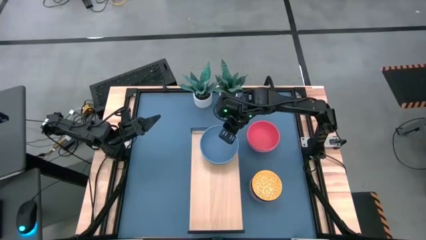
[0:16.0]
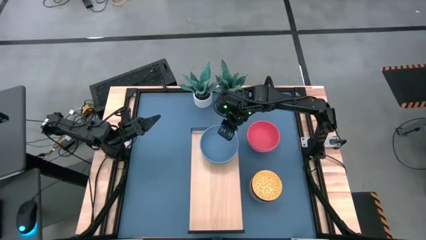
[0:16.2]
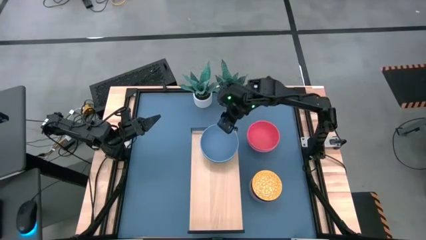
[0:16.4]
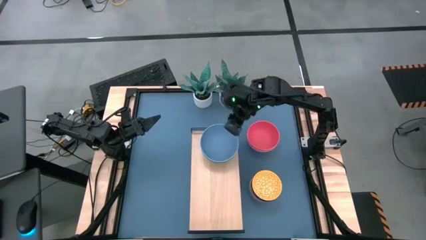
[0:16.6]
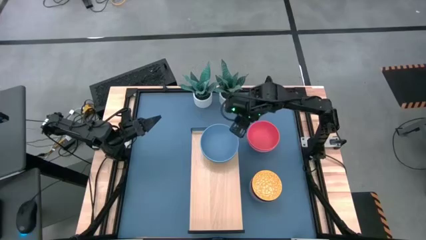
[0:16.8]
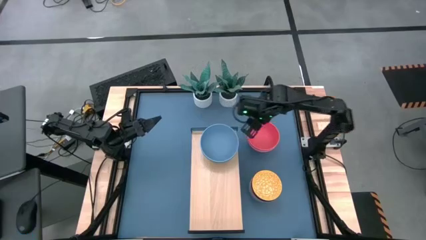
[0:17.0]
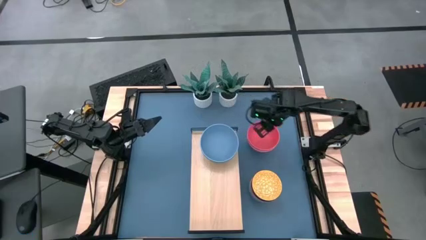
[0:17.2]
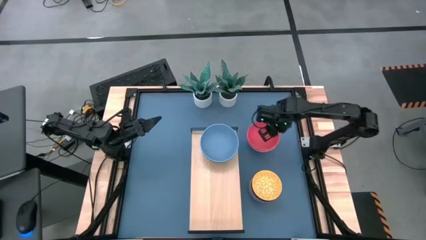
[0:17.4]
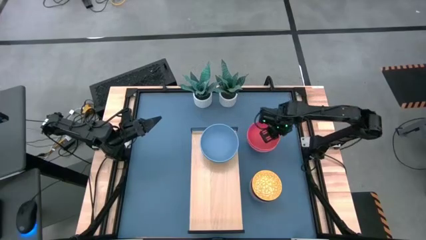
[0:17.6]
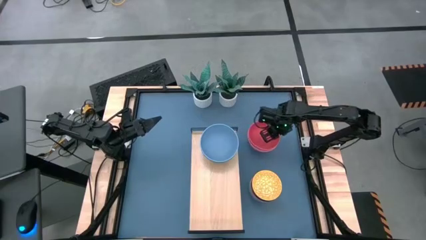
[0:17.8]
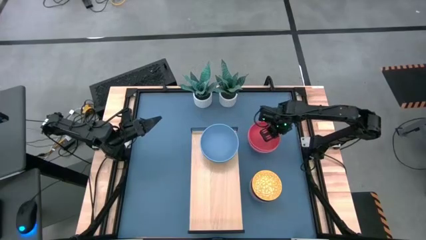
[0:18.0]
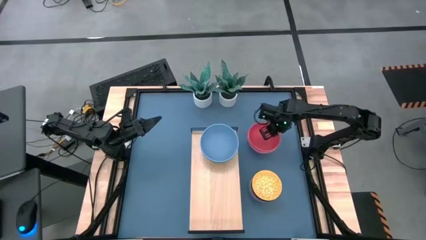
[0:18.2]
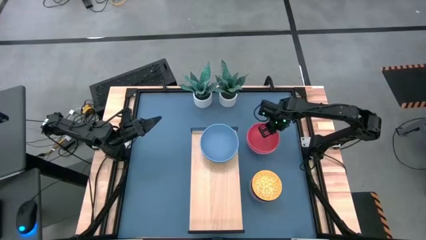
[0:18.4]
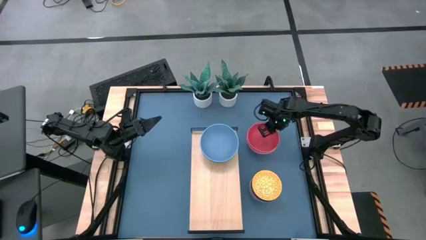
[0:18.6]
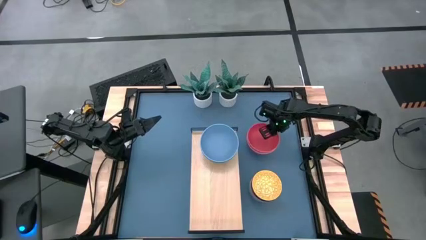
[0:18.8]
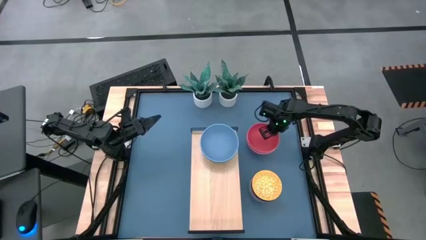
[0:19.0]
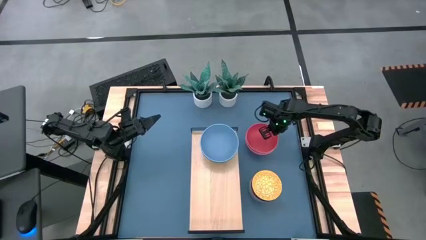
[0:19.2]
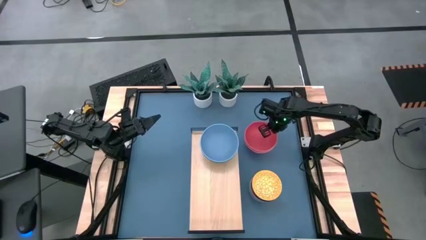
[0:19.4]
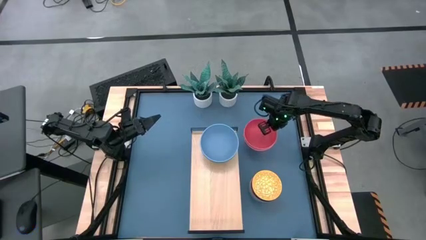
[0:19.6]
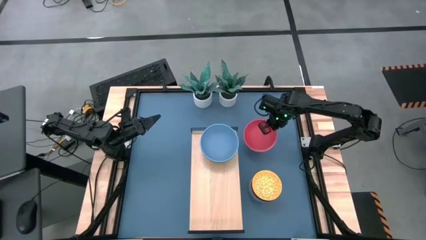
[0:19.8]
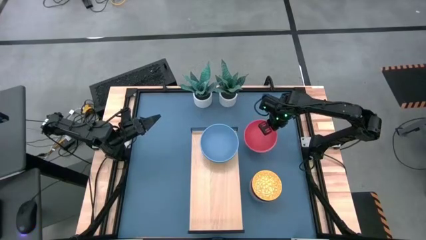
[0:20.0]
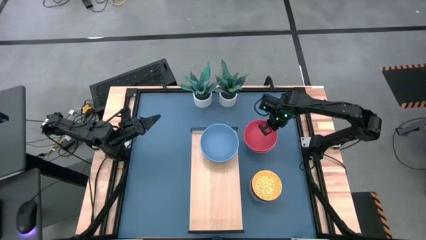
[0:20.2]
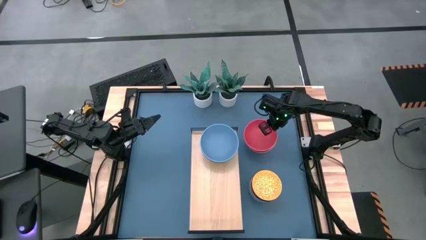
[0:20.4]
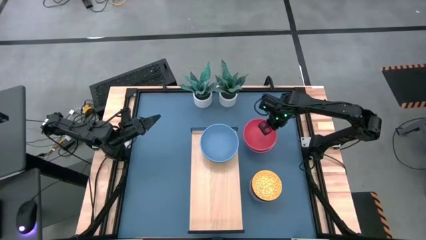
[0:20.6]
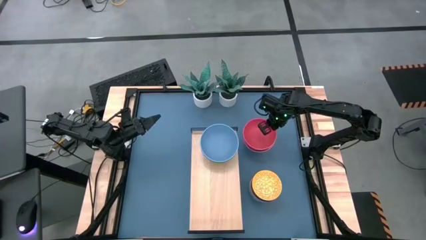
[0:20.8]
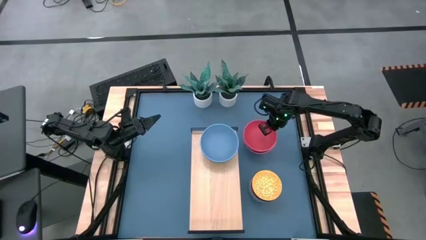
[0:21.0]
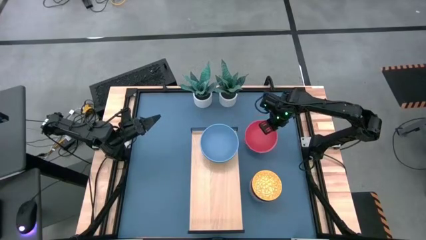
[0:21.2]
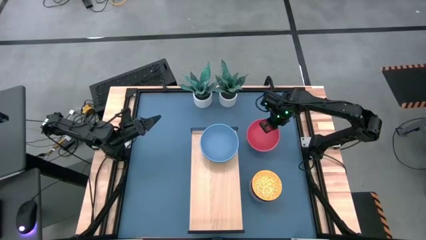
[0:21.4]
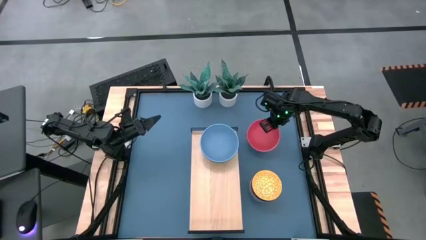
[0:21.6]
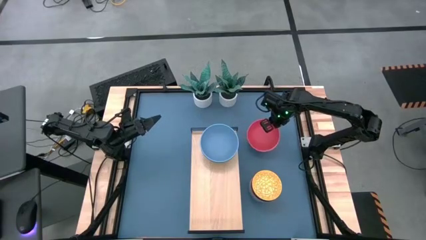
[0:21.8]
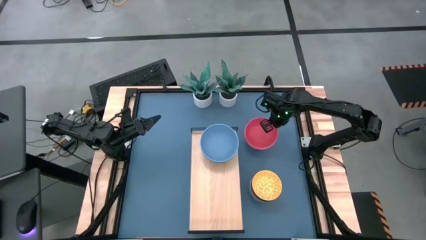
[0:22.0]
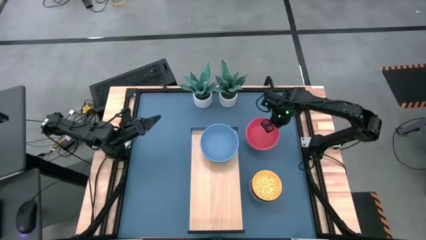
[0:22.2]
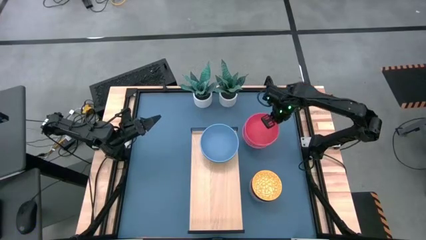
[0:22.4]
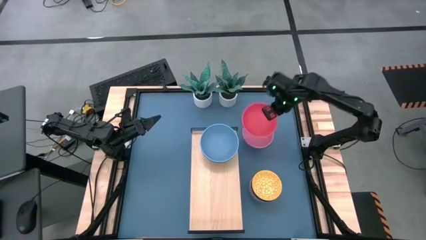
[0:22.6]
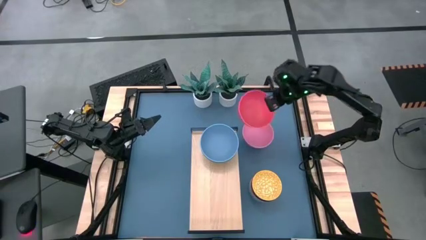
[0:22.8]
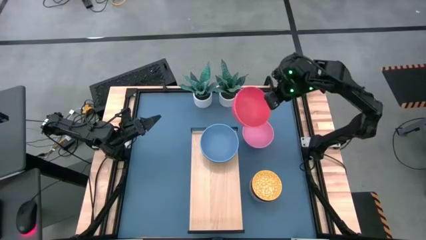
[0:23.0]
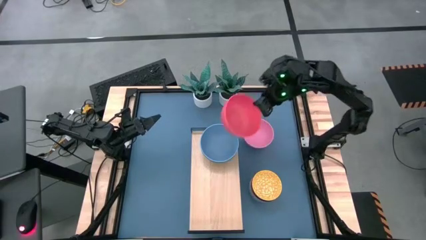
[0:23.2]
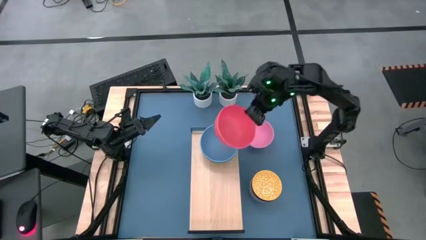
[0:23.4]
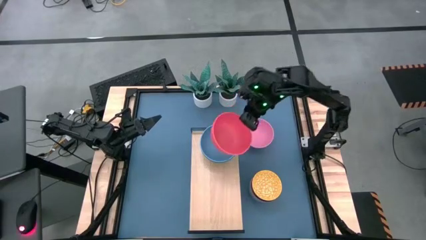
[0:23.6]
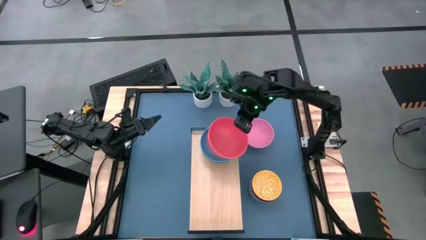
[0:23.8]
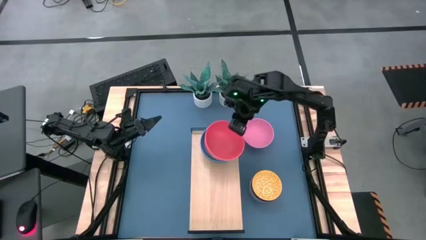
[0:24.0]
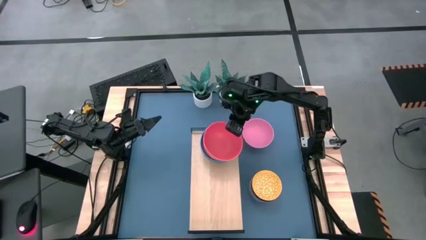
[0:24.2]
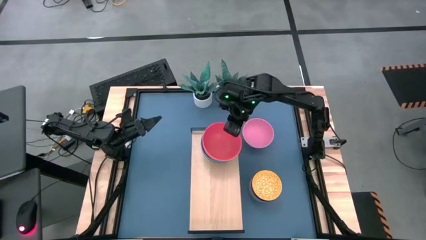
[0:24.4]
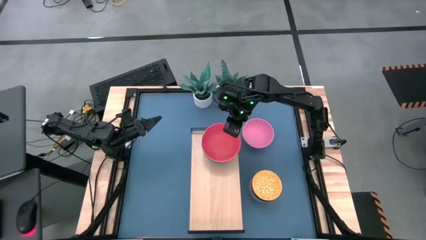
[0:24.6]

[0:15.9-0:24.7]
Task: Place and stack bowls onto a shelf
Stack the orange bowl on top of the blue bowl on the shelf

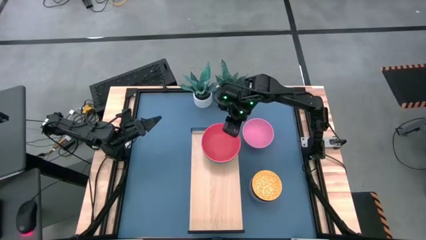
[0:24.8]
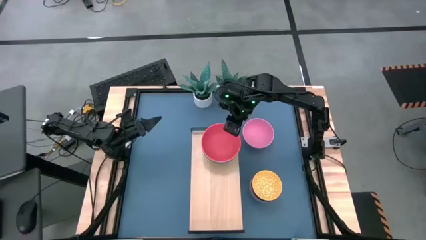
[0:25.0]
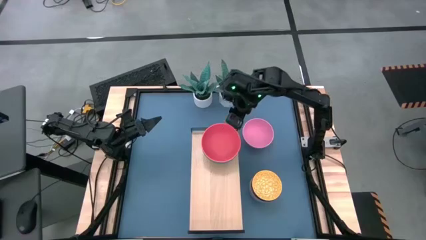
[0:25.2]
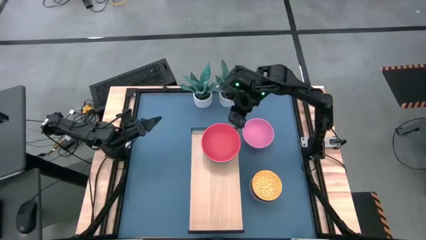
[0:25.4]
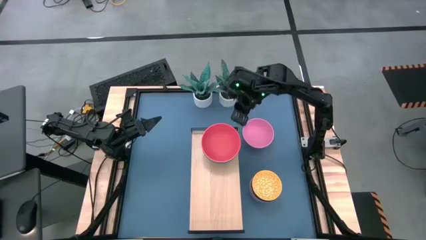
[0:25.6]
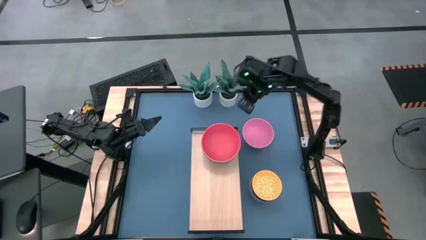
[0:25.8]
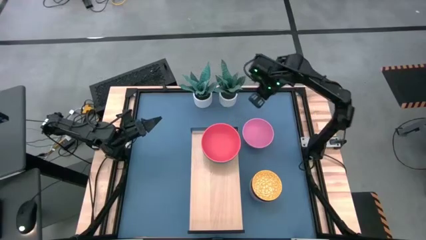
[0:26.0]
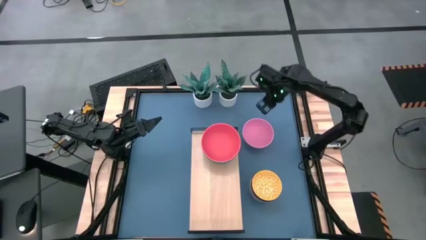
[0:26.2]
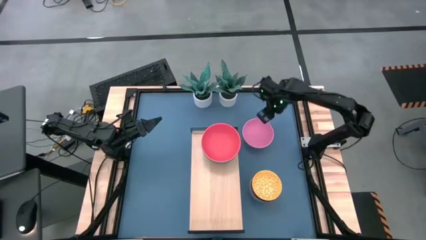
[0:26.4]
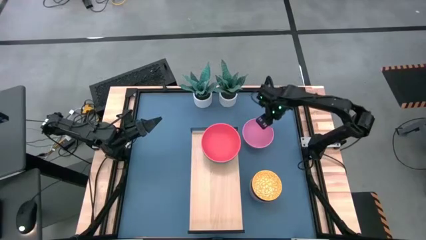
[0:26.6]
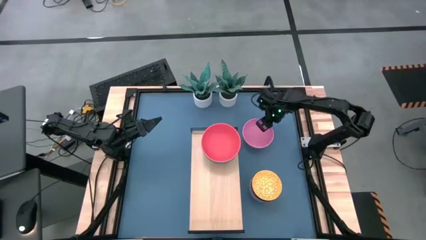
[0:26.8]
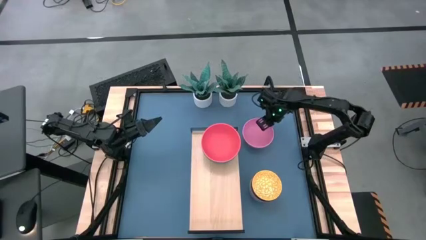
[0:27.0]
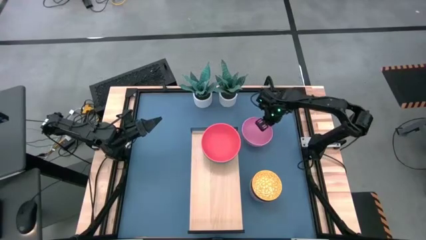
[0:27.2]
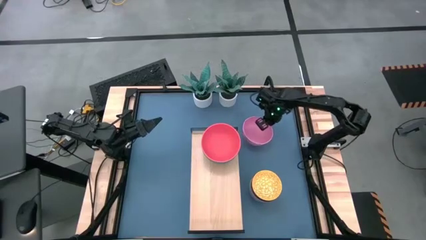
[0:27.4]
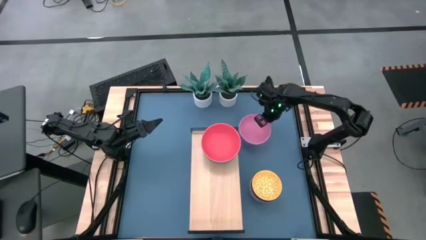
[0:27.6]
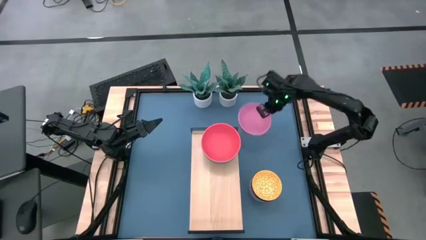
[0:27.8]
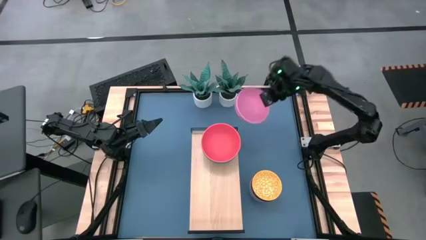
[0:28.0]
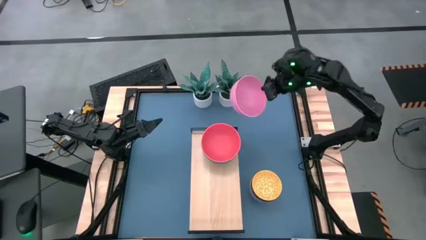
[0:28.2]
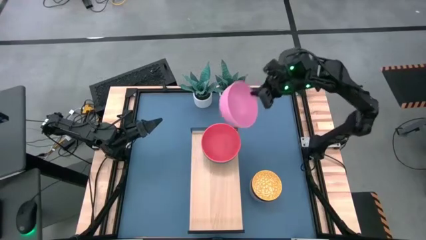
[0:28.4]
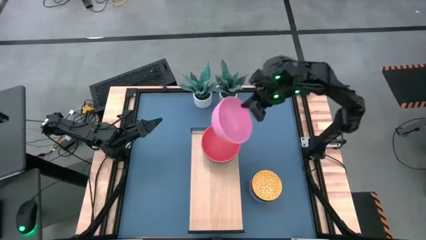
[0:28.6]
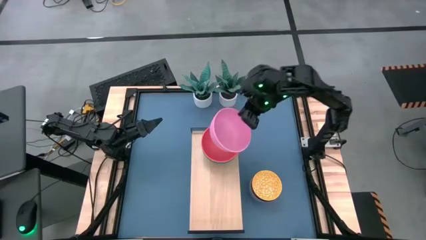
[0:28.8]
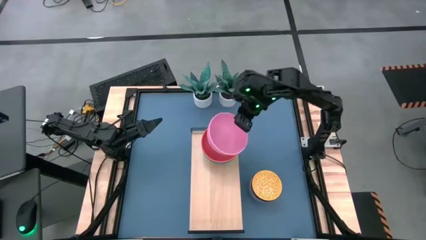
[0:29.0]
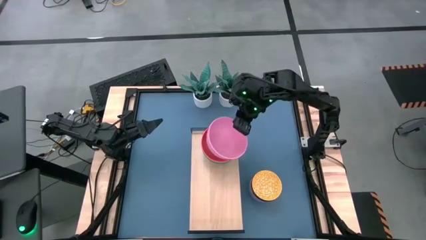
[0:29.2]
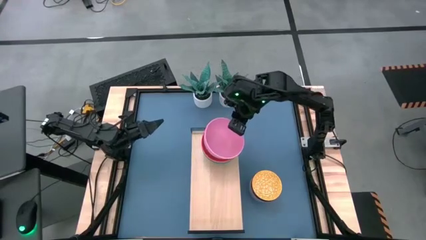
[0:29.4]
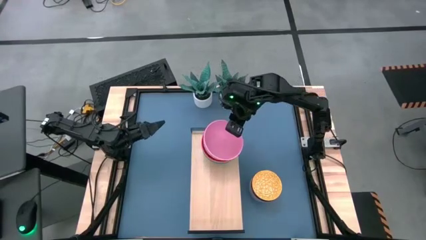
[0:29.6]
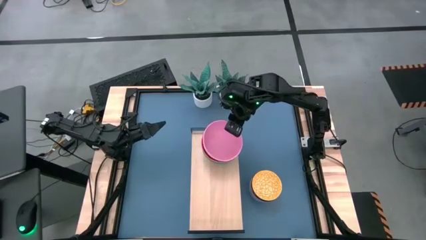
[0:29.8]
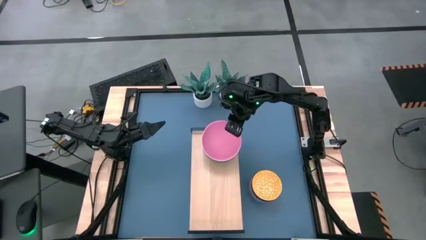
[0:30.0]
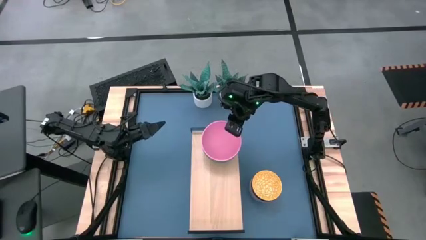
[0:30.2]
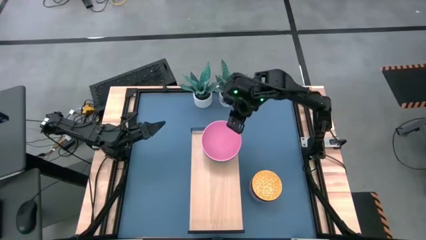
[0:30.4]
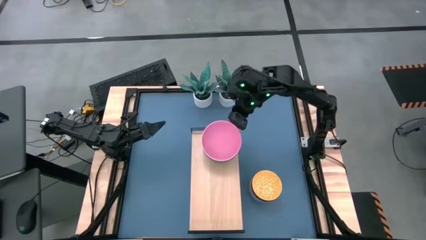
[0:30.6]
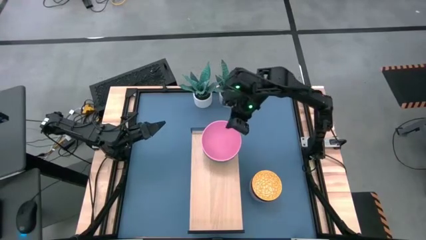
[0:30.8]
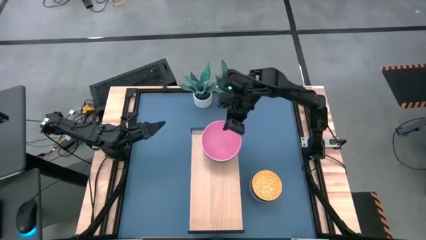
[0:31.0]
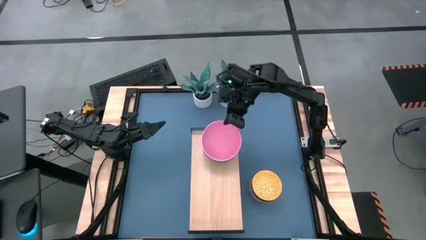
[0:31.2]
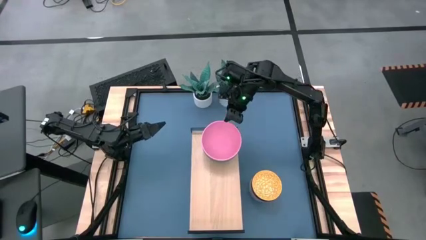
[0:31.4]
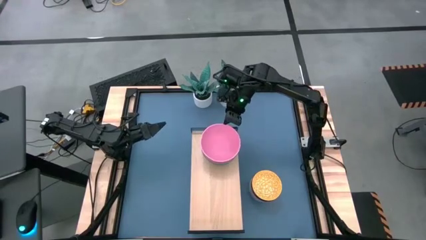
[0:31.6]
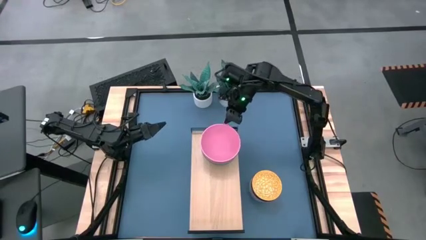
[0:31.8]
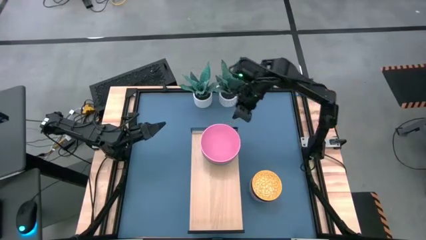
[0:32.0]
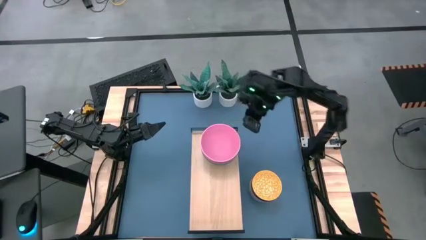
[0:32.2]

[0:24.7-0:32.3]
Stack the pink bowl on top of the orange bowl on the shelf
